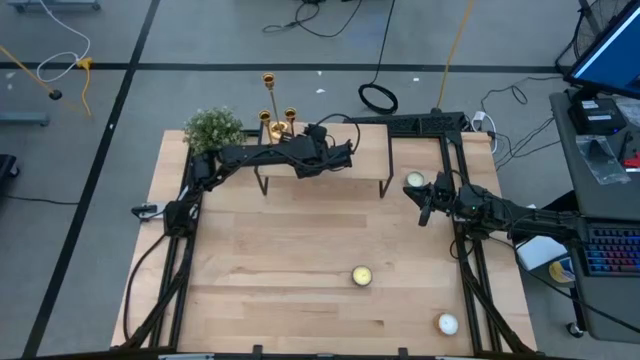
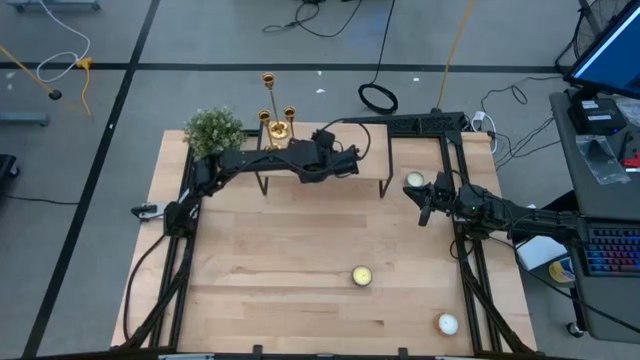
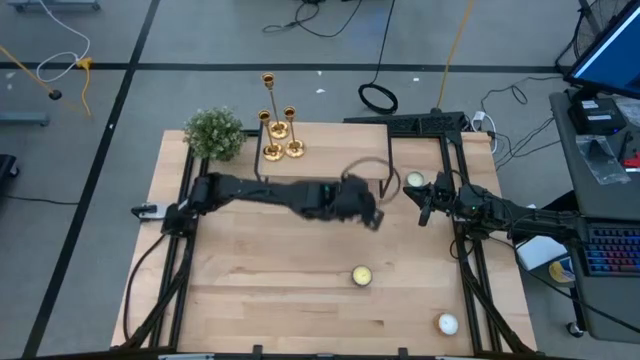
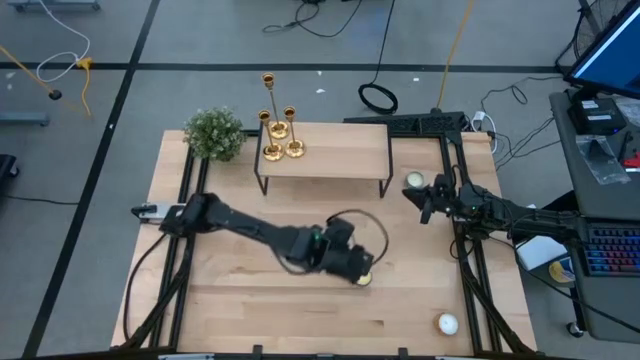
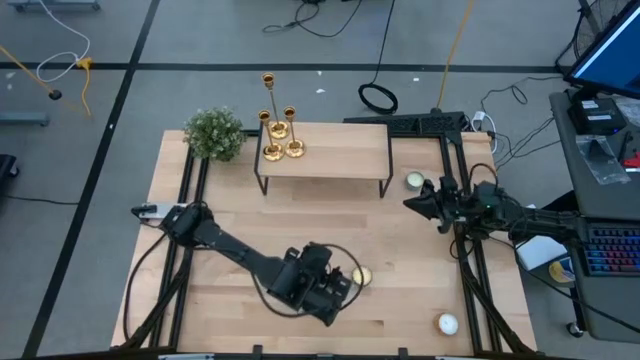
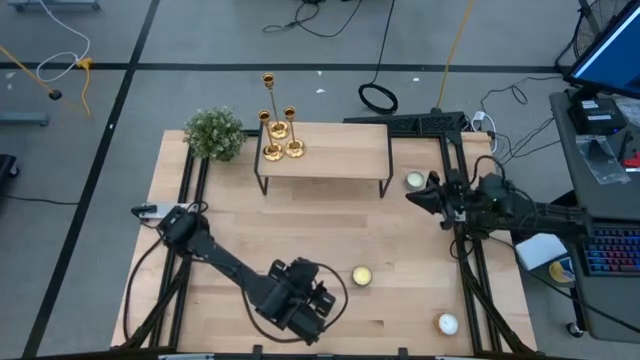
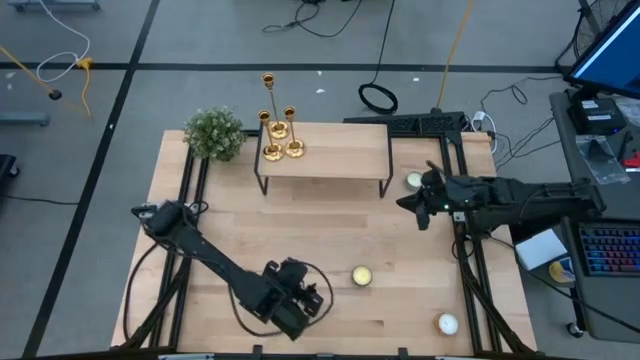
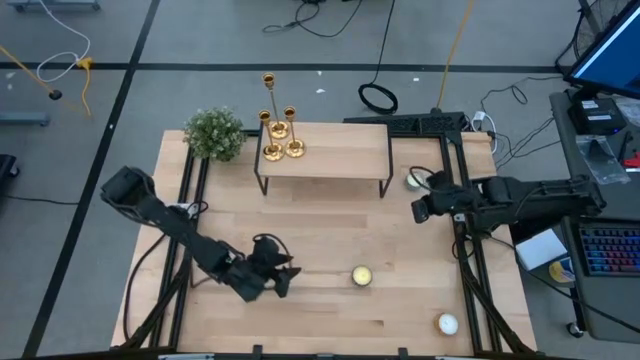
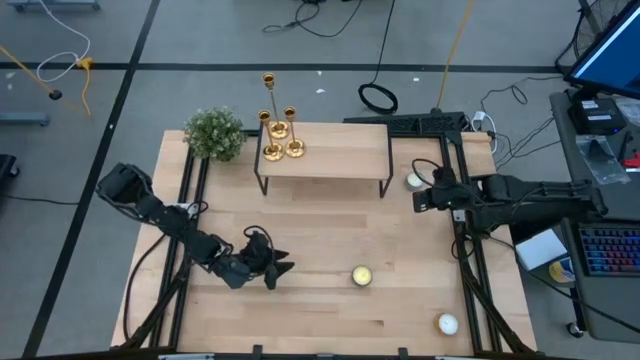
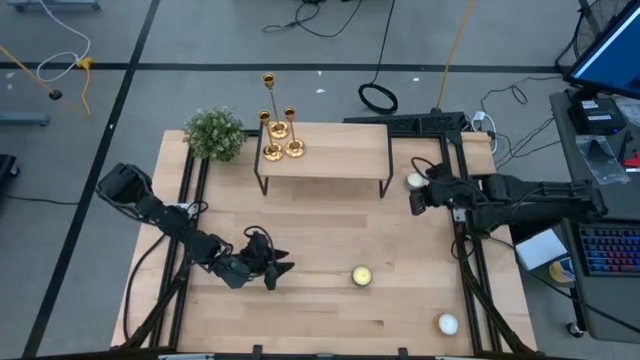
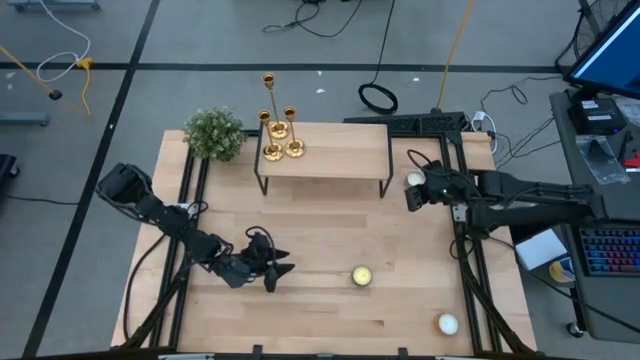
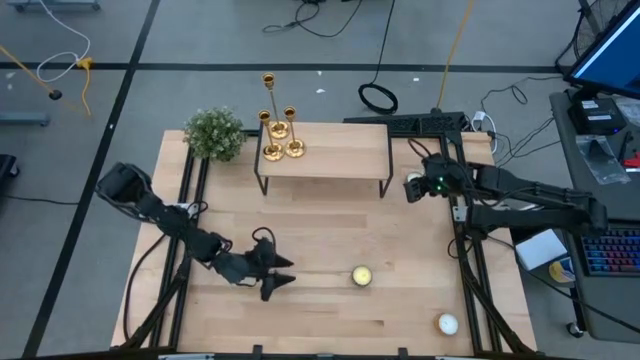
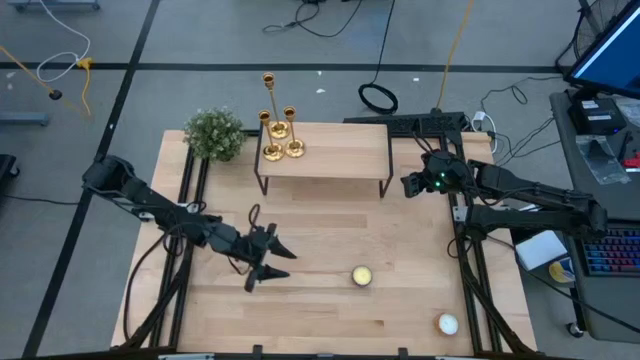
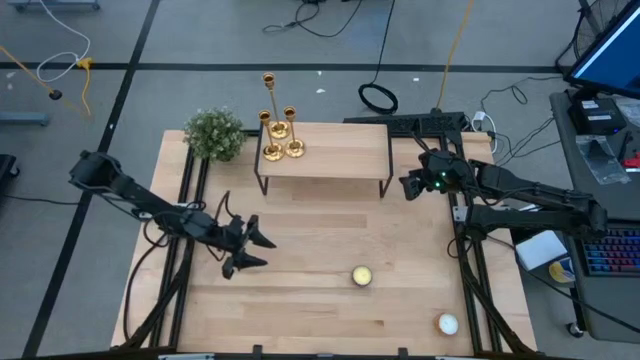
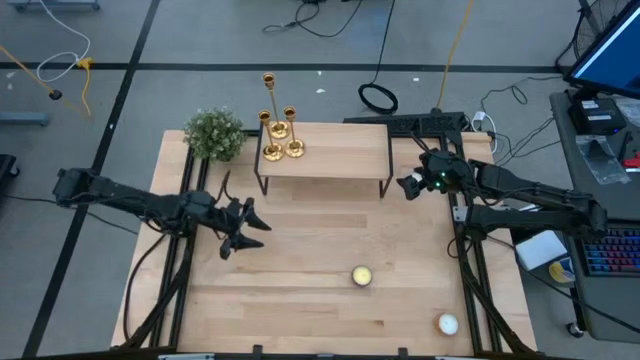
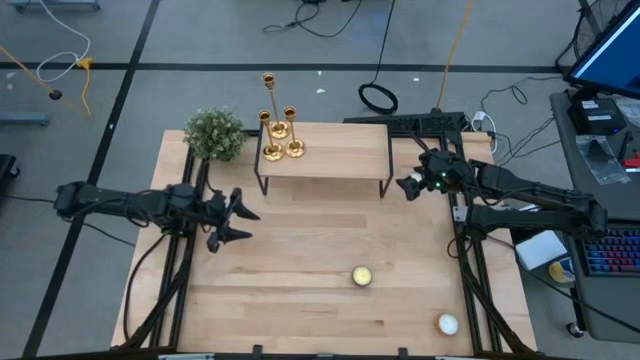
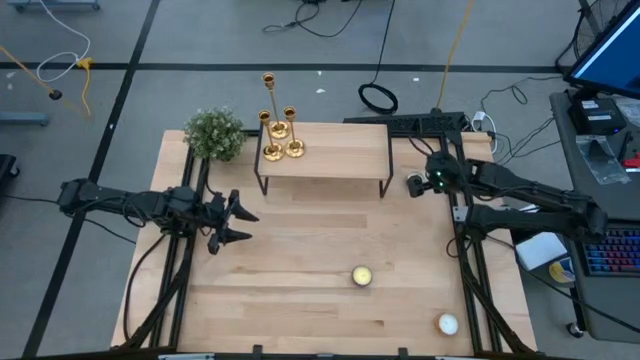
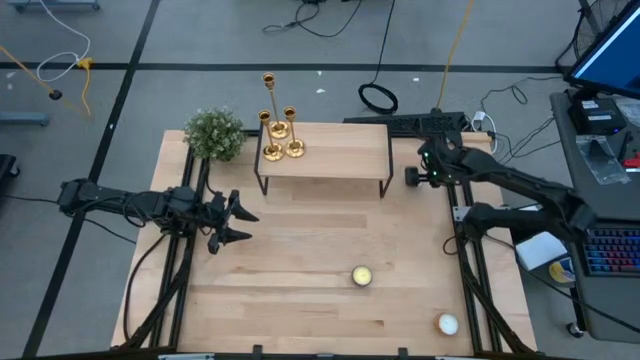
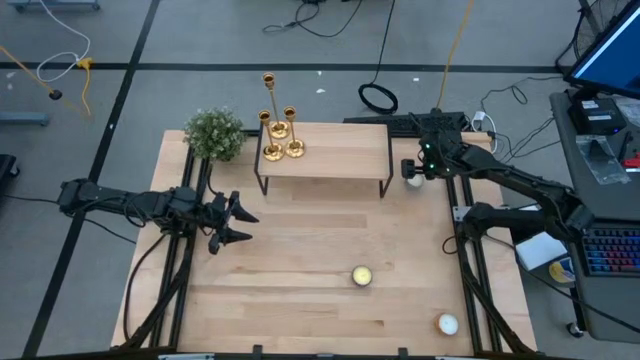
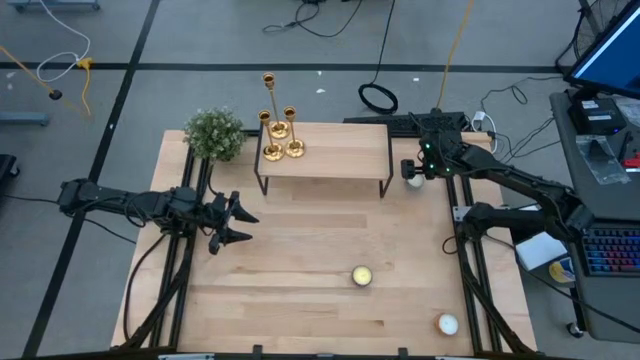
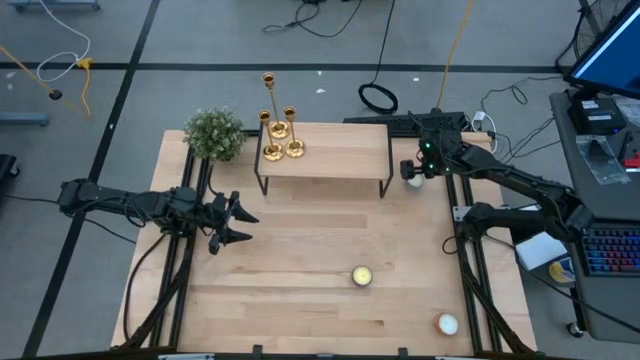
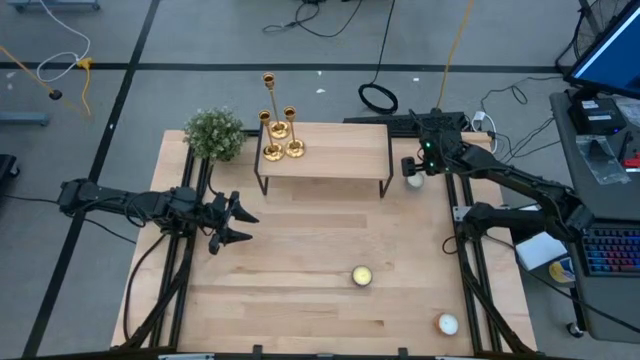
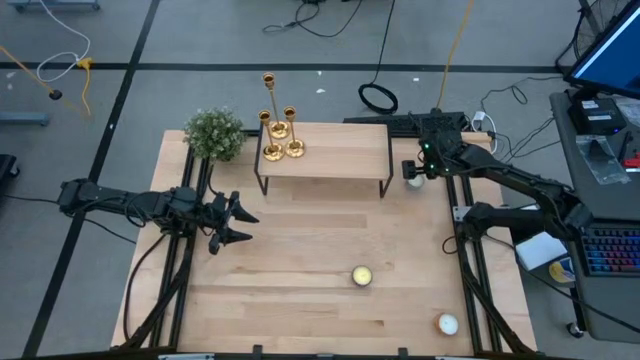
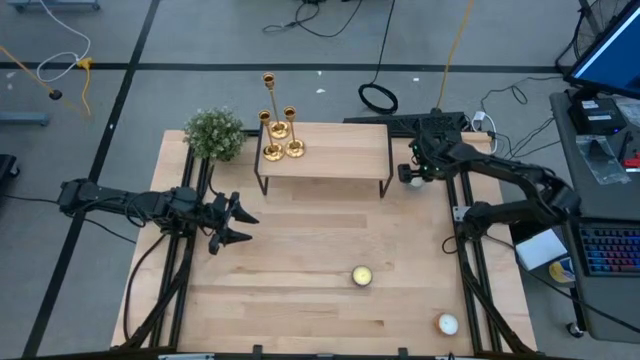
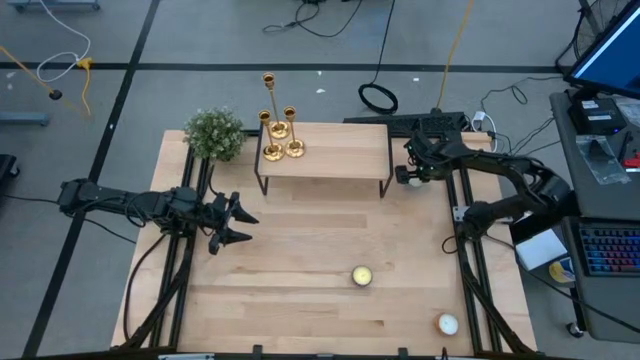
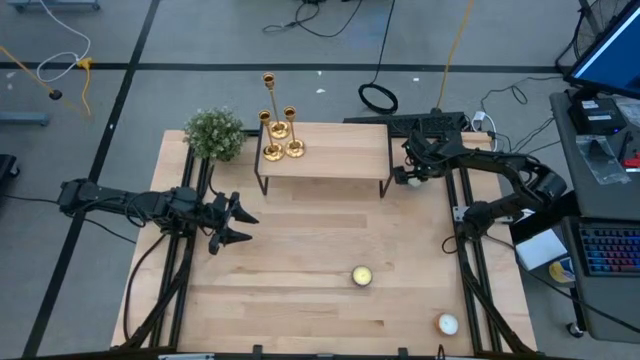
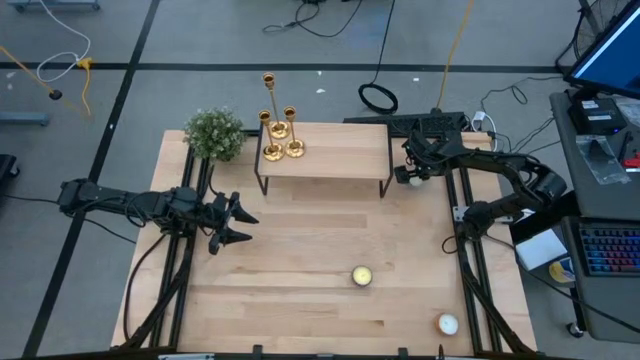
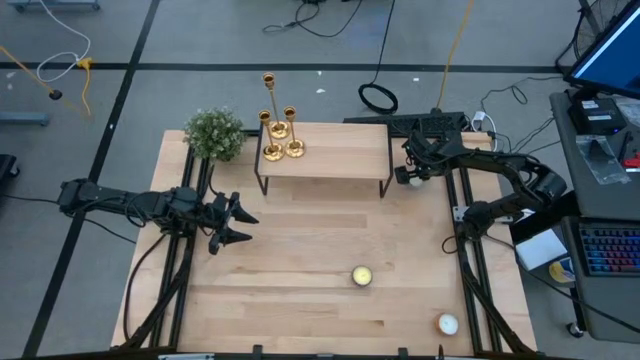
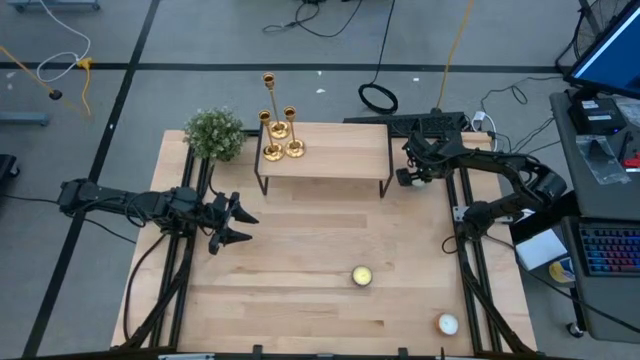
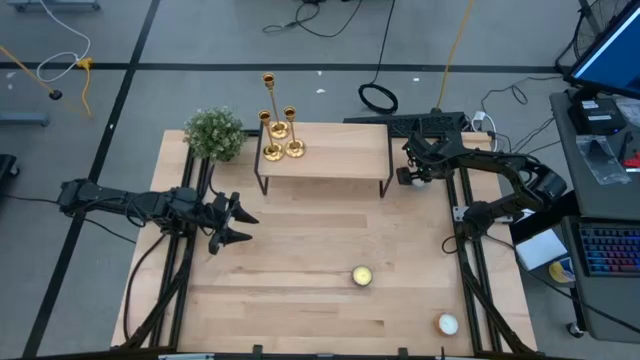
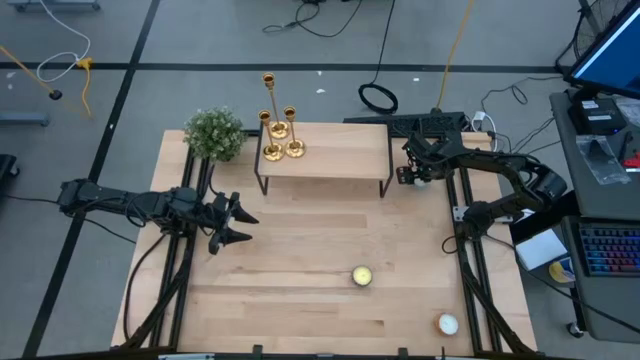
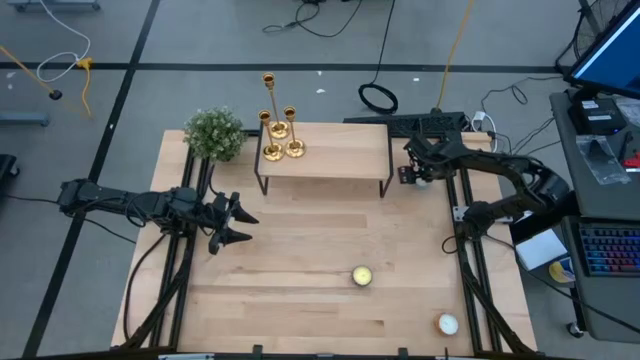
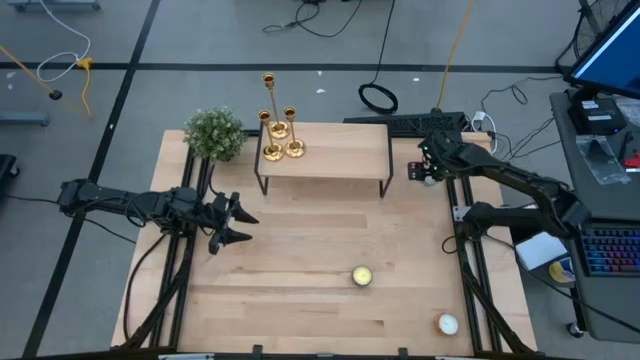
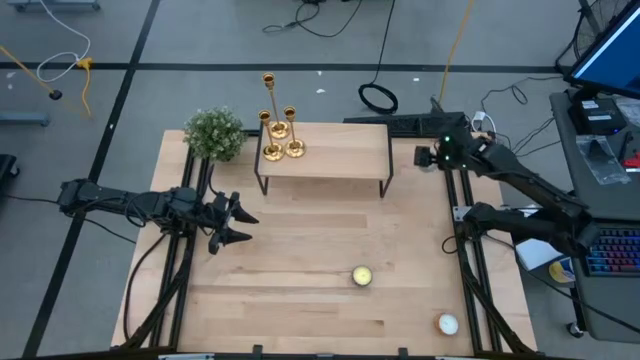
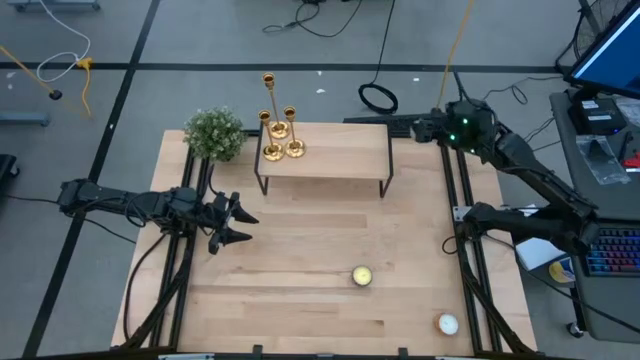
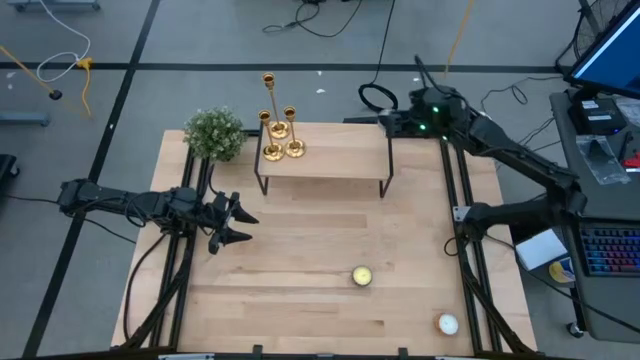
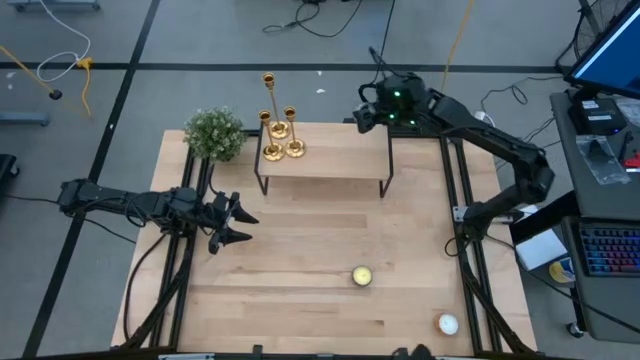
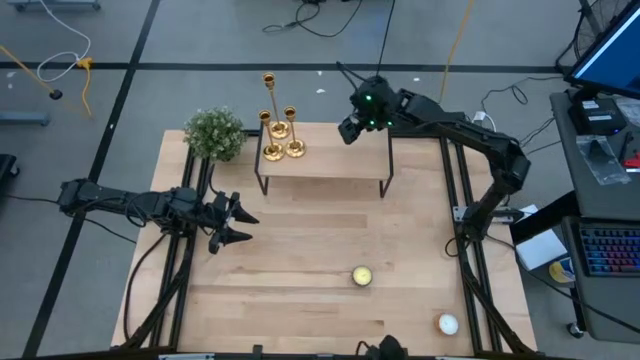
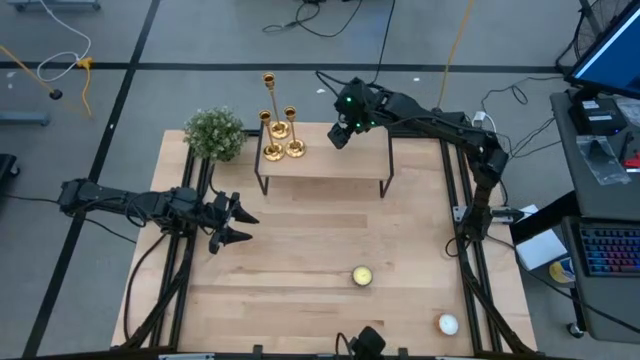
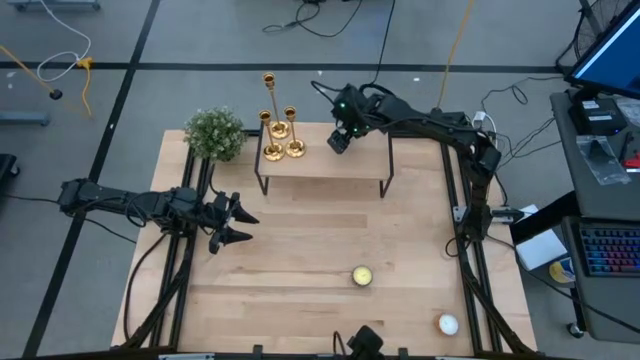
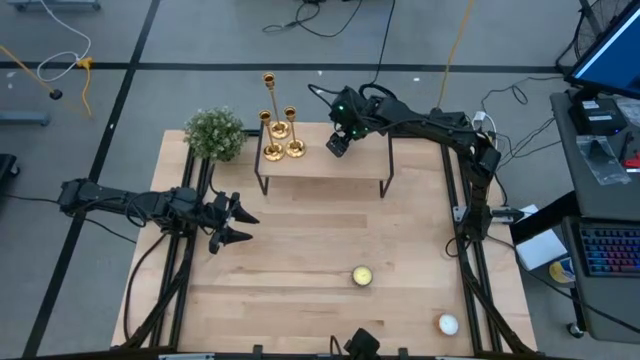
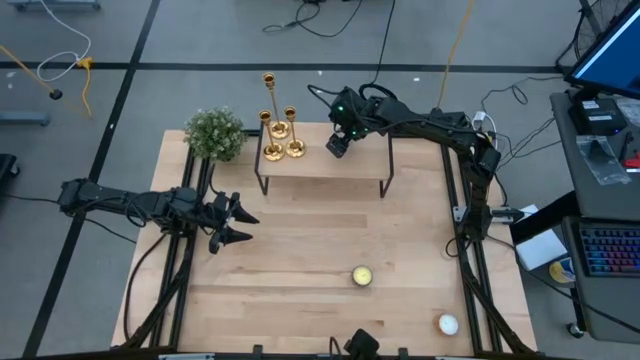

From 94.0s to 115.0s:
Task: Pick & Place candle stick holders
Put the blue scented candle on the shelf
